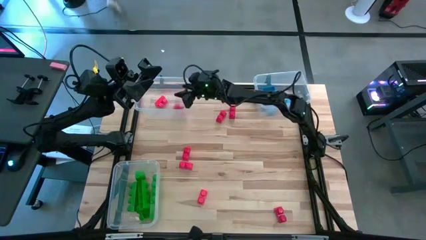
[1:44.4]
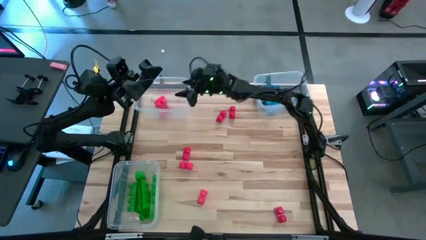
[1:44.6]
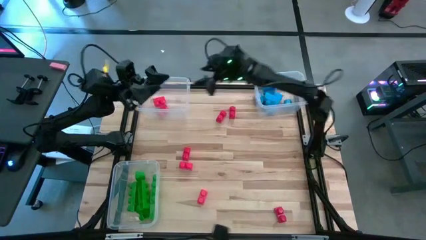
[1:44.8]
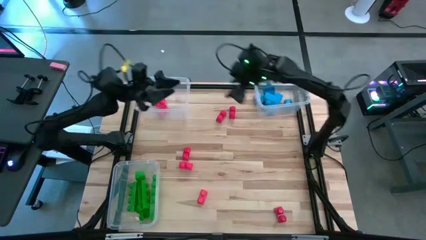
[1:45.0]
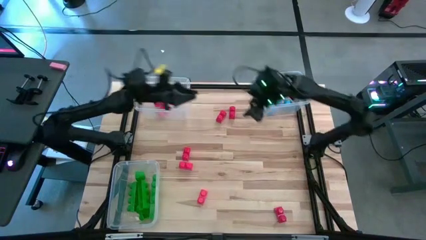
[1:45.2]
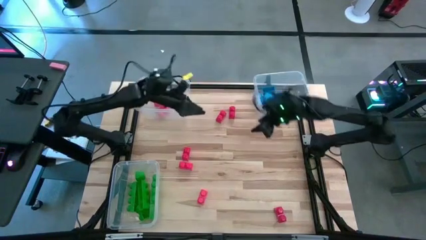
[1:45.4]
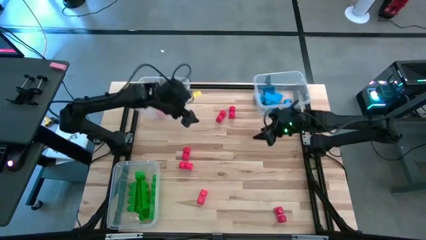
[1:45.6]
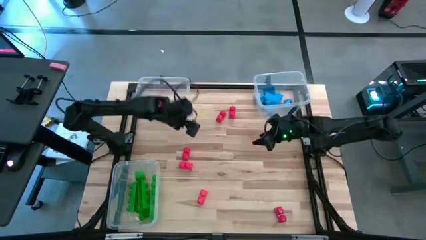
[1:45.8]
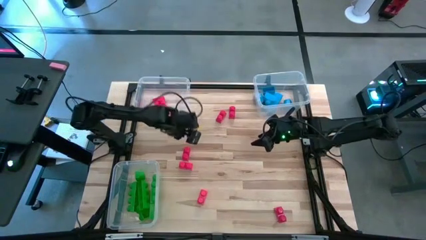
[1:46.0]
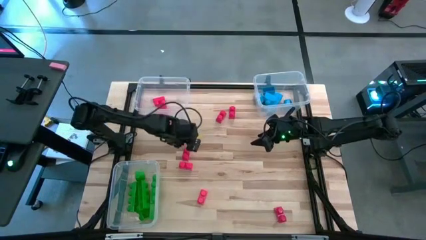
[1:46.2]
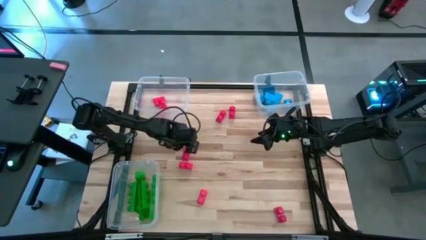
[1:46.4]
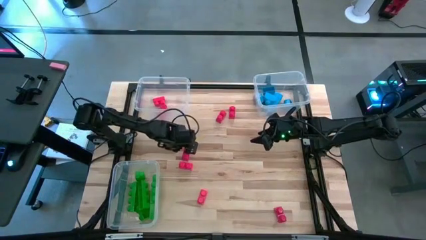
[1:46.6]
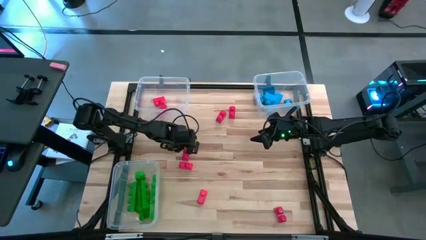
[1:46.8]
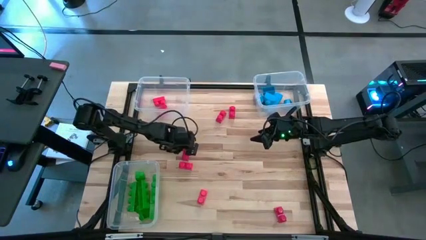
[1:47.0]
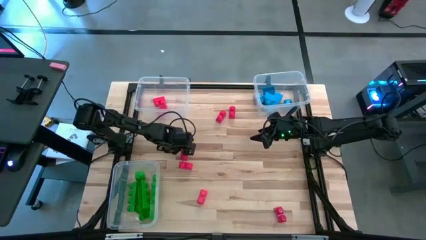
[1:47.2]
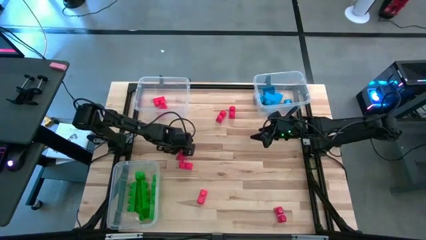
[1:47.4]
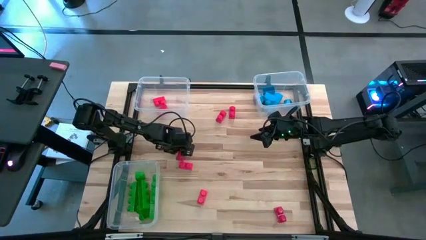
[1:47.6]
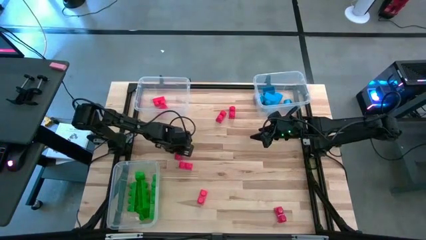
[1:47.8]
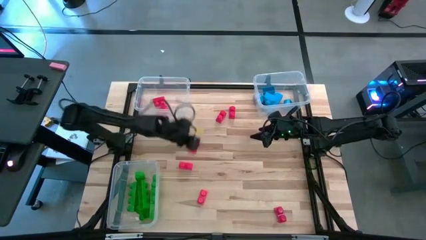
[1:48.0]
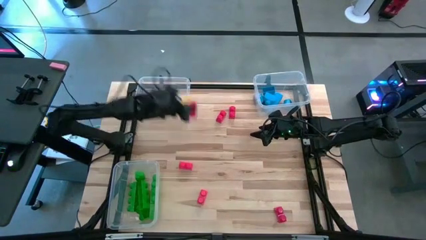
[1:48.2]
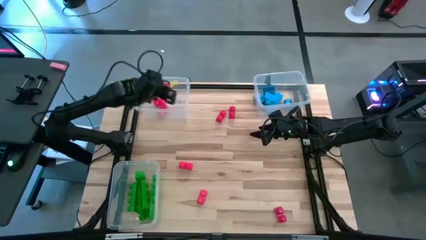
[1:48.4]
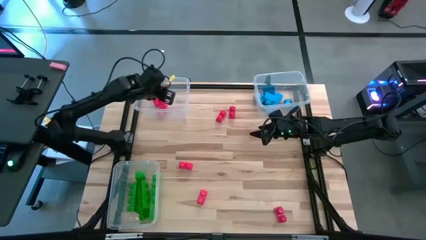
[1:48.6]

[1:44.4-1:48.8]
Task: Sort blocks
Put the red game piece into the top left transparent bin

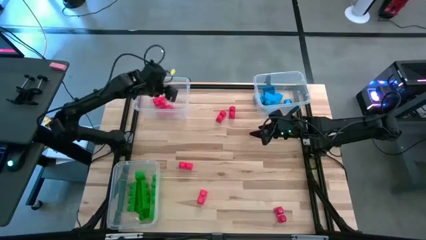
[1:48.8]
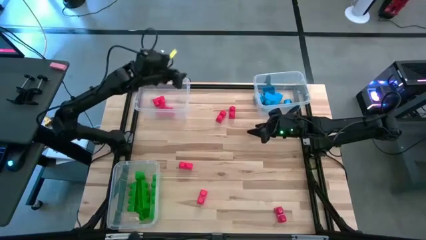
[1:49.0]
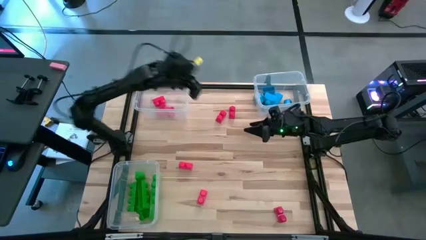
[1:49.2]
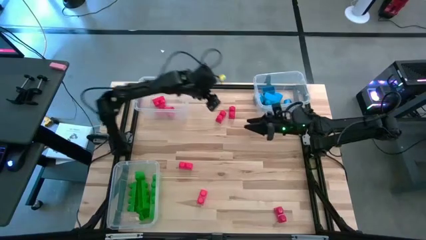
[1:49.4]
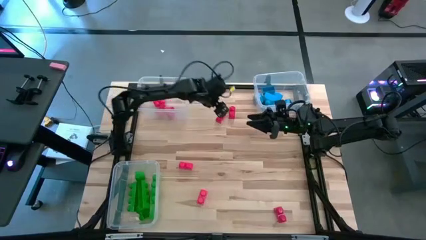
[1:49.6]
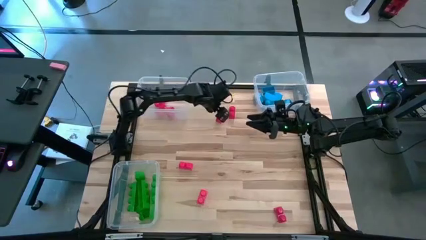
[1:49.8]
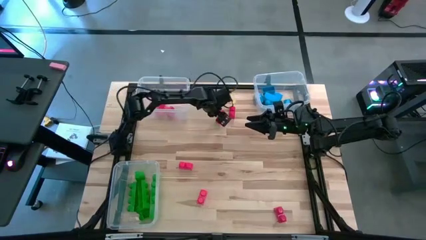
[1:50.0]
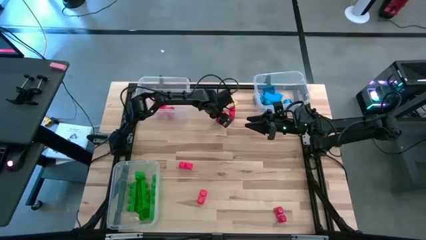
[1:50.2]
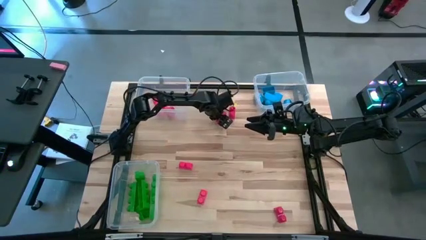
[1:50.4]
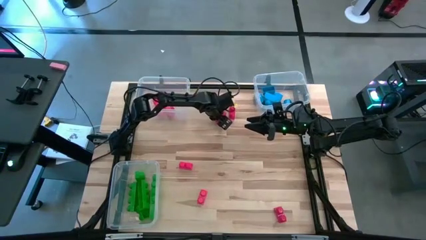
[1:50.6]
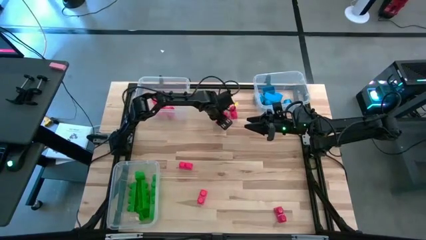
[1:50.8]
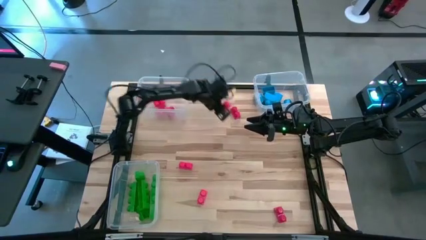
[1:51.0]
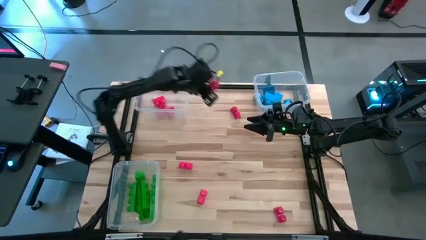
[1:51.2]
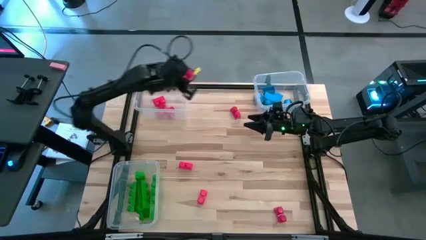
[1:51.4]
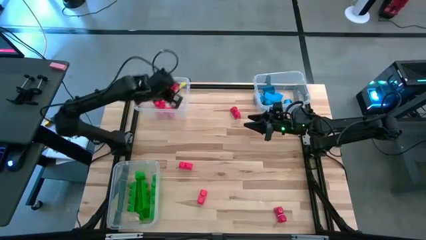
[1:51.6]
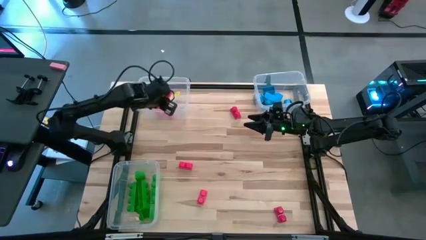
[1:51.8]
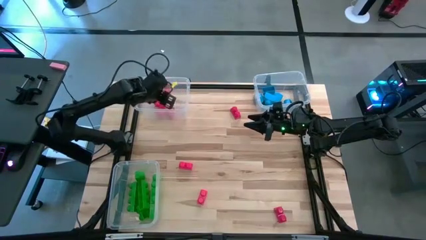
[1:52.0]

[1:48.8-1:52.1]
Put the red game piece into the top left transparent bin

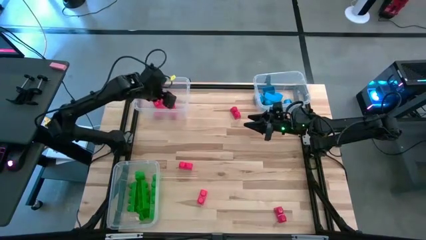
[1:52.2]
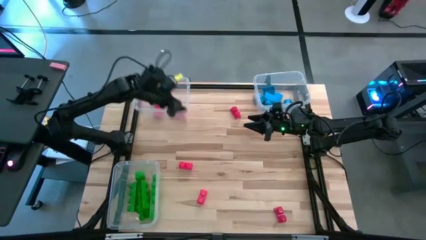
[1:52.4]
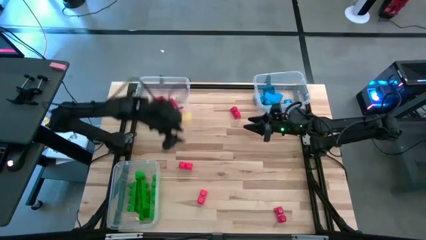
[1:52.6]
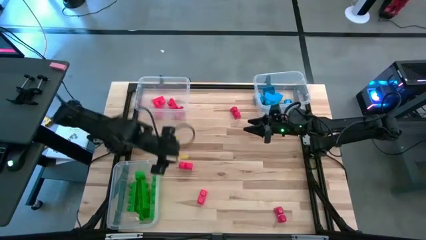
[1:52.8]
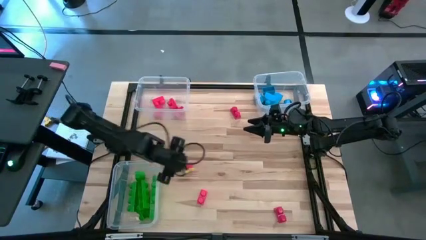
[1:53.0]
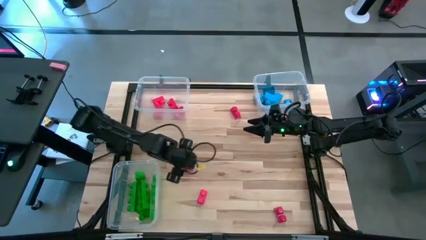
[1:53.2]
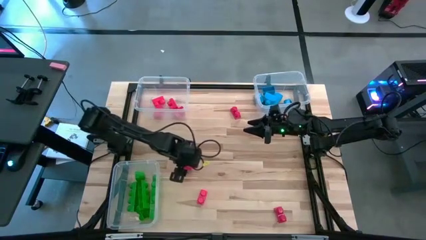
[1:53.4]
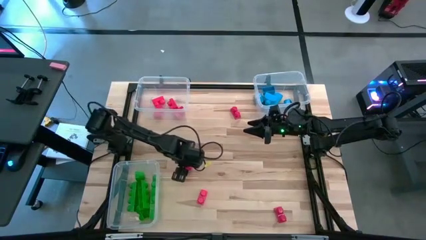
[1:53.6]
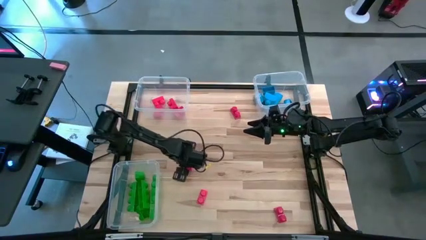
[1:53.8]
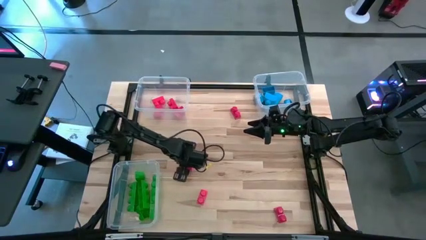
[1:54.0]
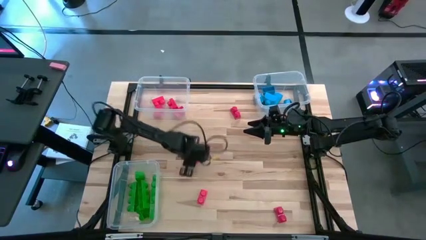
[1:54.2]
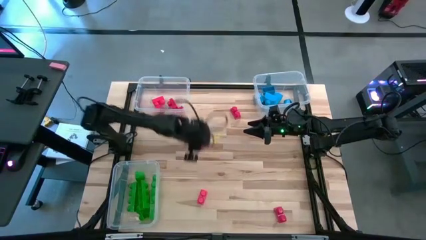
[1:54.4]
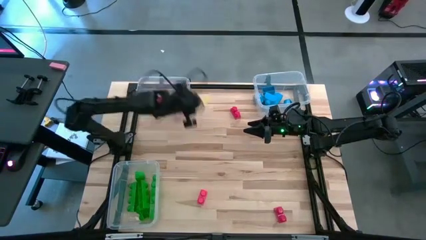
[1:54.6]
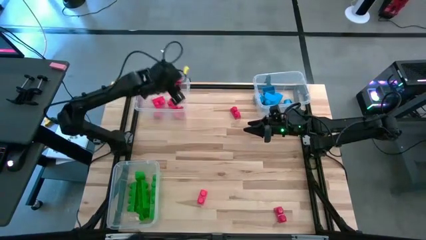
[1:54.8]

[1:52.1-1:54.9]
Put the red game piece into the top left transparent bin

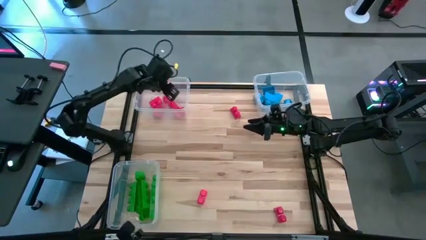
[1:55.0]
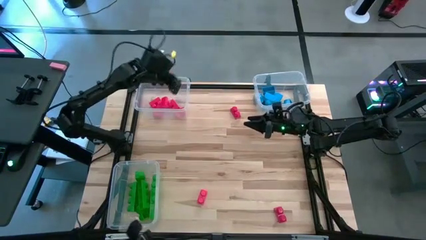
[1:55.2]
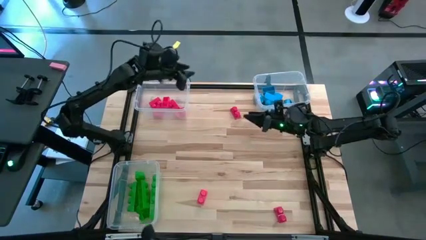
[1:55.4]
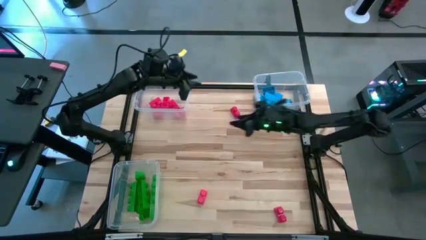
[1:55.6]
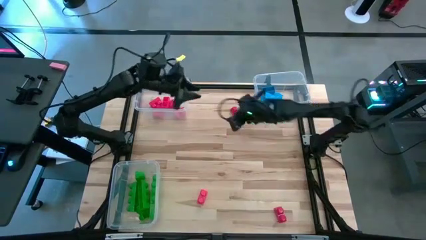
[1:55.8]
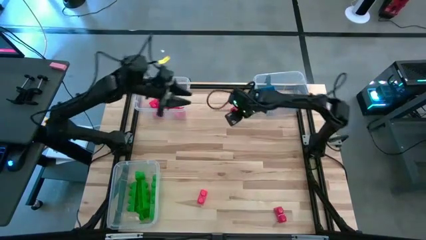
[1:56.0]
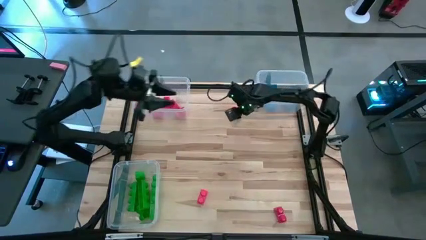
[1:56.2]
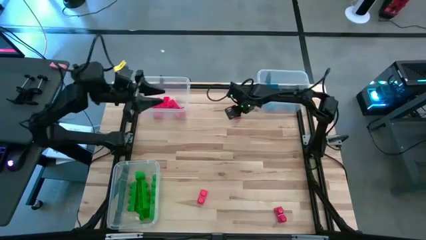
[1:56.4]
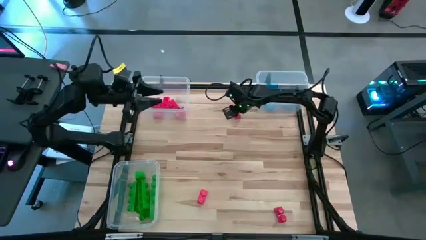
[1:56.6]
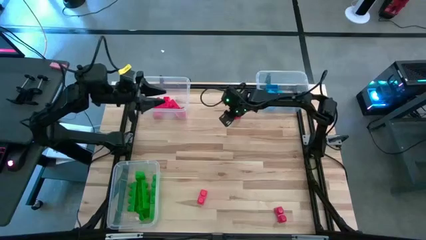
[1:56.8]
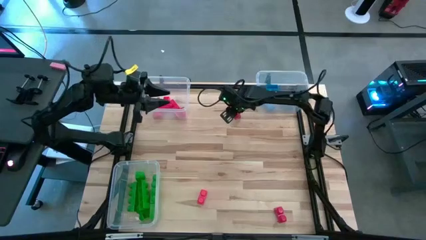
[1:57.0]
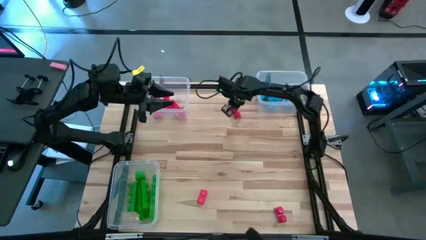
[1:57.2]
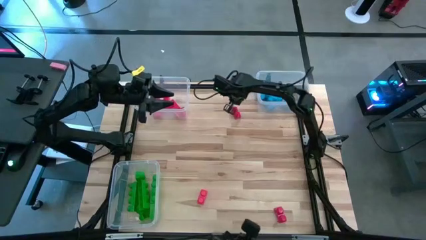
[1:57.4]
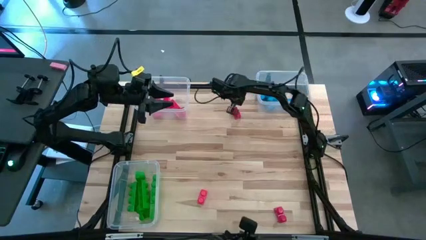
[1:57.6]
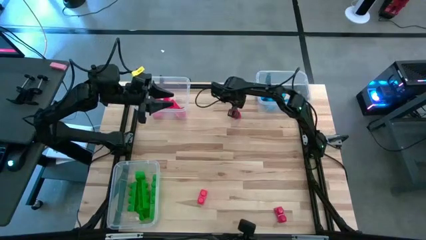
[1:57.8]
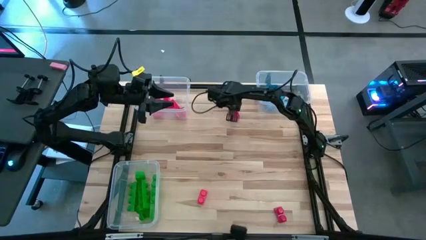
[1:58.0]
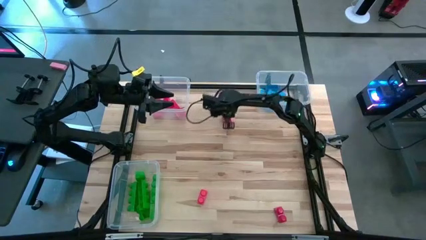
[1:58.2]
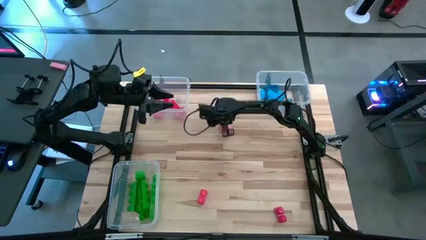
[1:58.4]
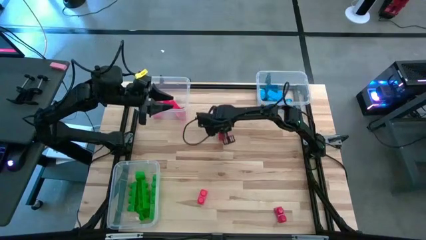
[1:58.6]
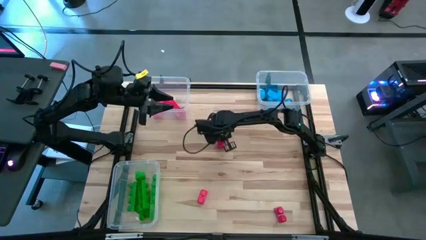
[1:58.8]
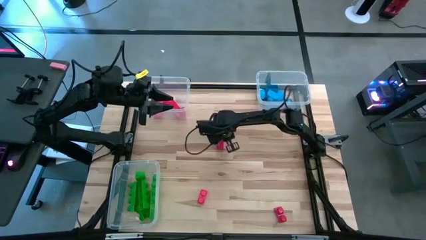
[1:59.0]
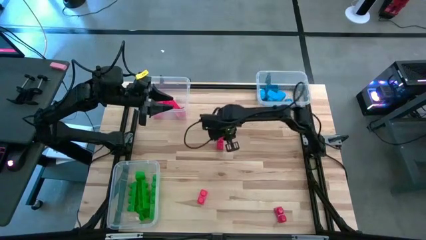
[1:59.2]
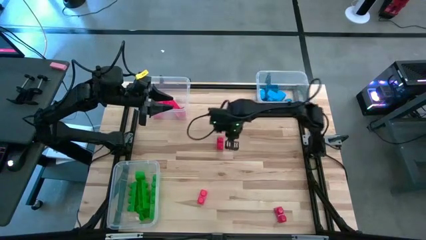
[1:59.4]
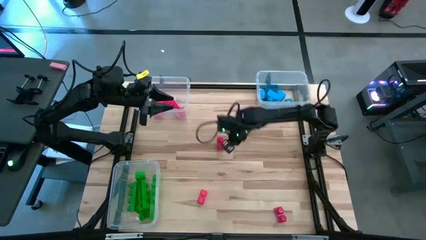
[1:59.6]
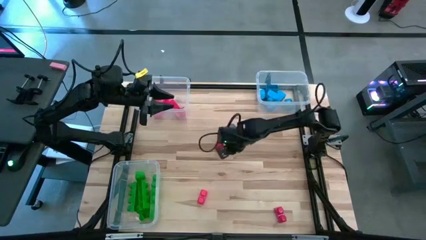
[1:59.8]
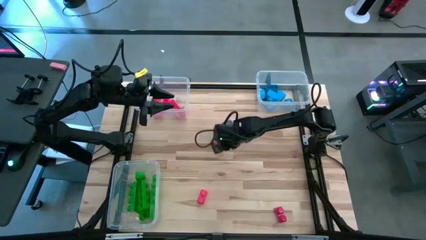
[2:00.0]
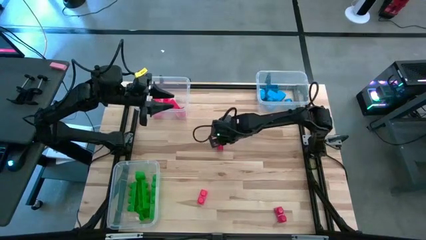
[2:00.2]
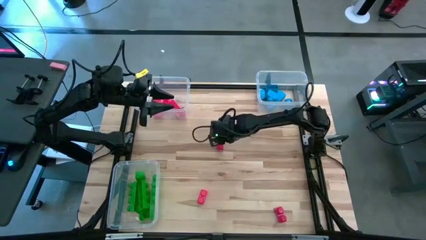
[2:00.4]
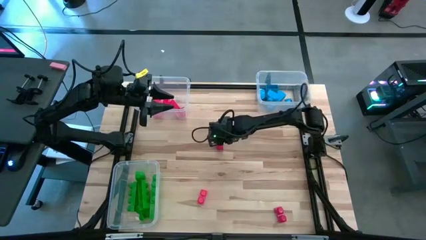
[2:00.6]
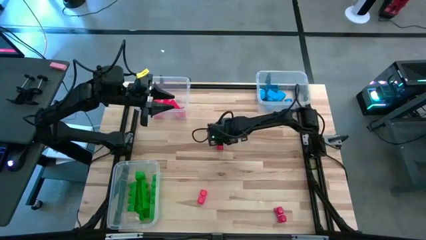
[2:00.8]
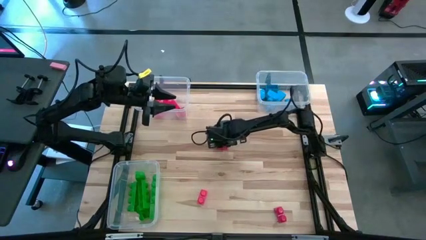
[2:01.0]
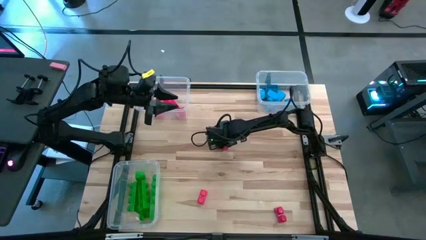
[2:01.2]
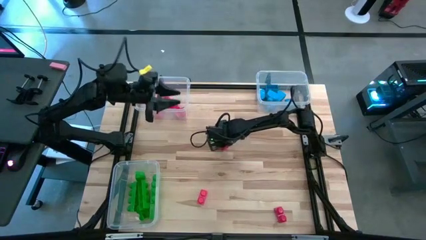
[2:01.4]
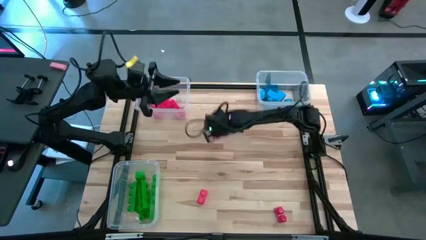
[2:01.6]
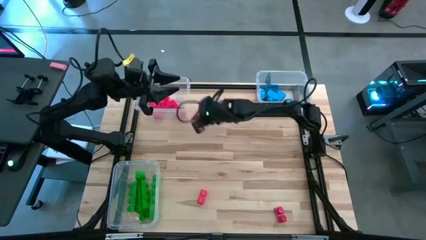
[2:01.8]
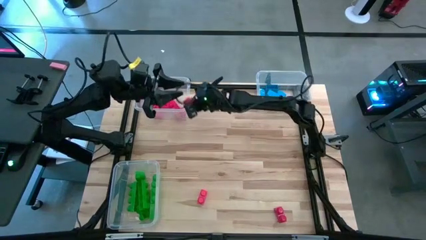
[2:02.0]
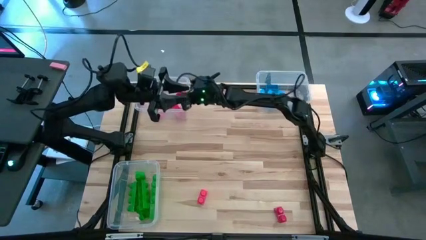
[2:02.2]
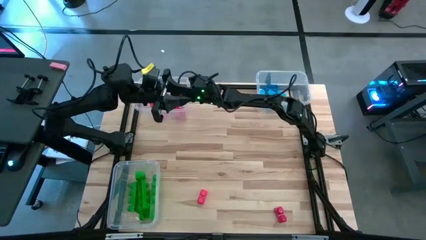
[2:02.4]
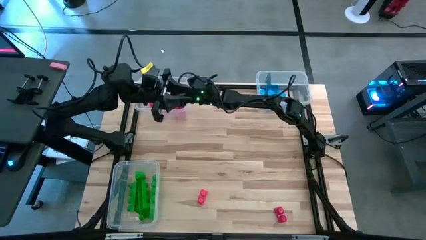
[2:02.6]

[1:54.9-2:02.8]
Put the red game piece into the top left transparent bin
